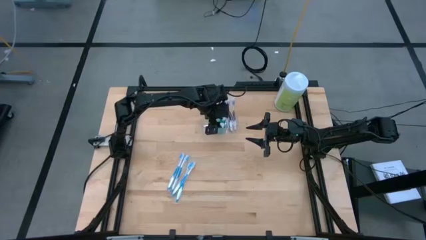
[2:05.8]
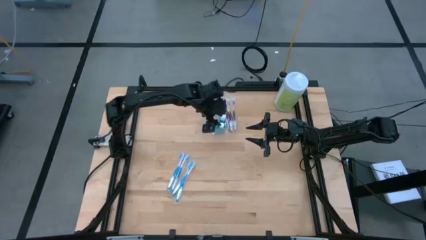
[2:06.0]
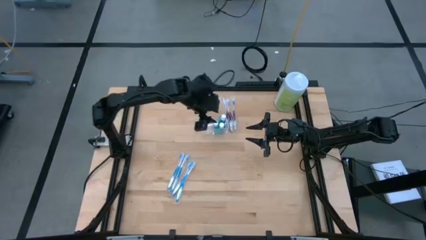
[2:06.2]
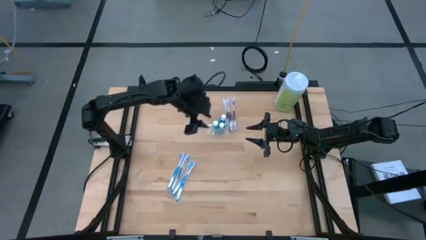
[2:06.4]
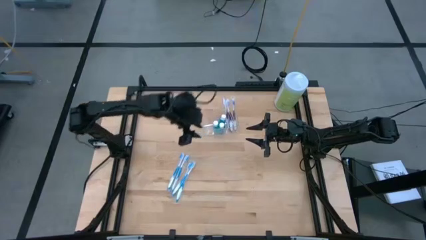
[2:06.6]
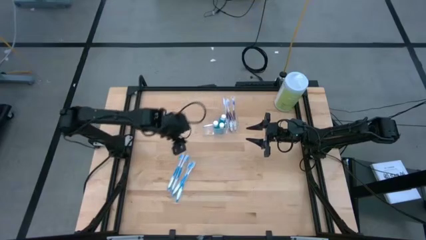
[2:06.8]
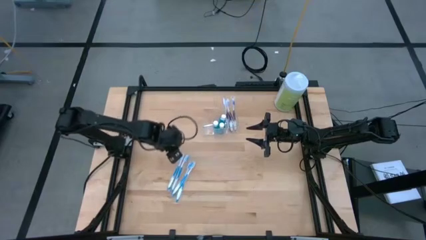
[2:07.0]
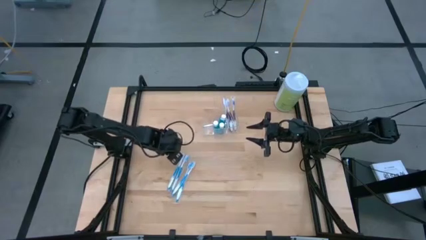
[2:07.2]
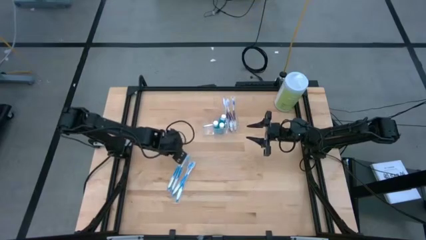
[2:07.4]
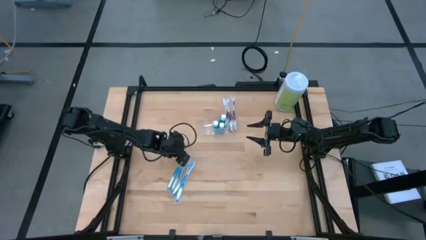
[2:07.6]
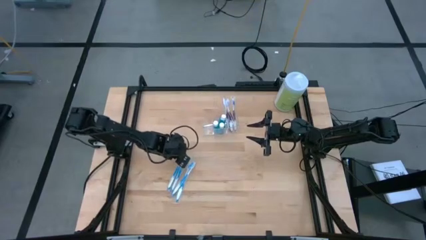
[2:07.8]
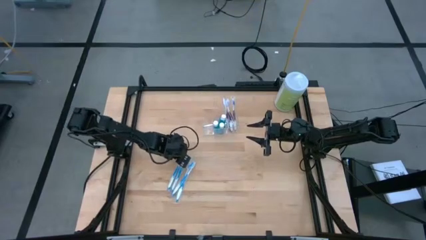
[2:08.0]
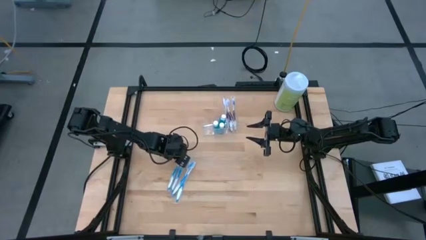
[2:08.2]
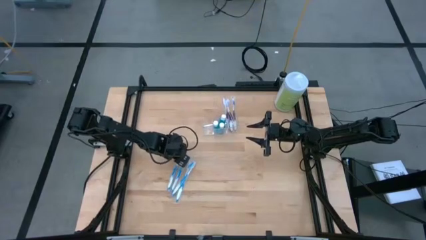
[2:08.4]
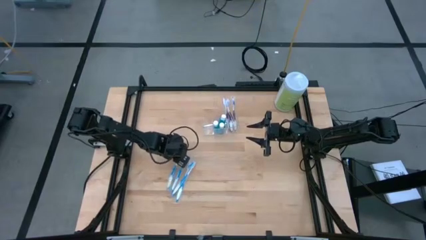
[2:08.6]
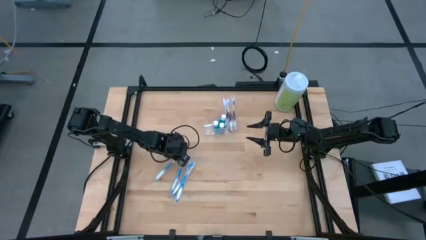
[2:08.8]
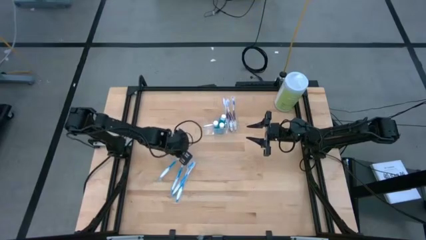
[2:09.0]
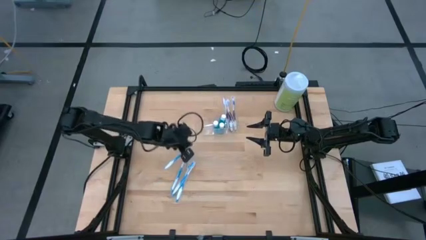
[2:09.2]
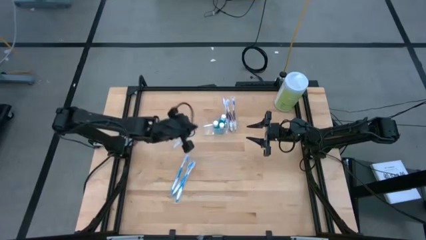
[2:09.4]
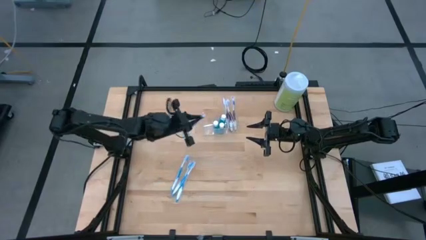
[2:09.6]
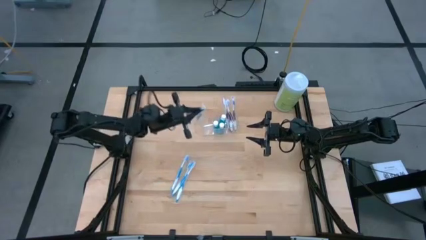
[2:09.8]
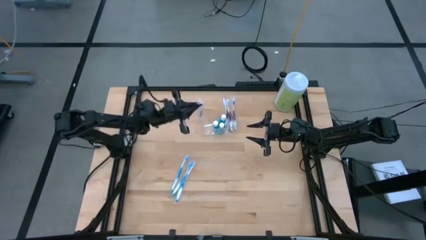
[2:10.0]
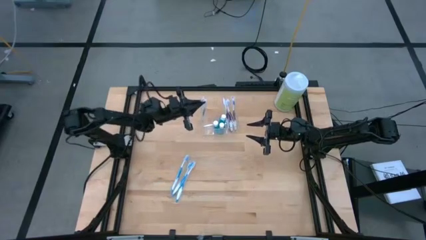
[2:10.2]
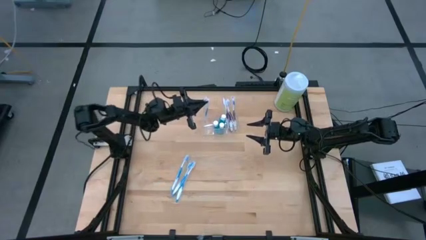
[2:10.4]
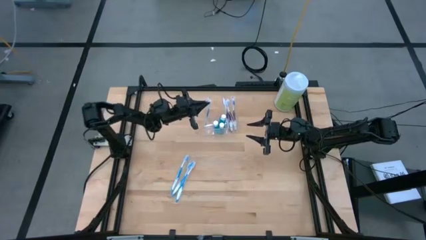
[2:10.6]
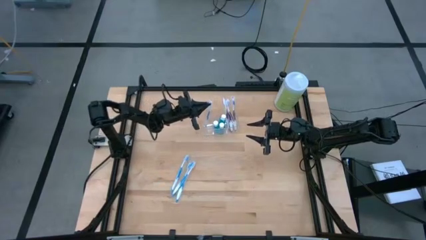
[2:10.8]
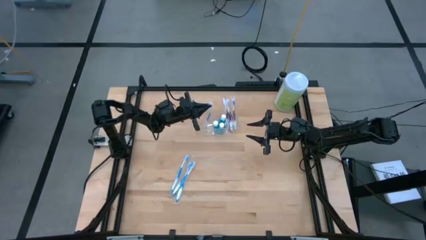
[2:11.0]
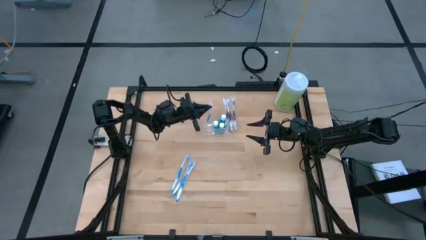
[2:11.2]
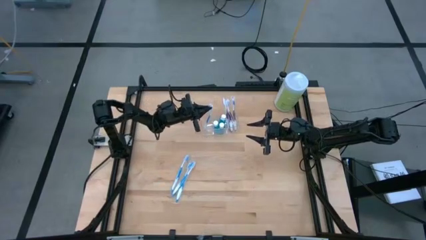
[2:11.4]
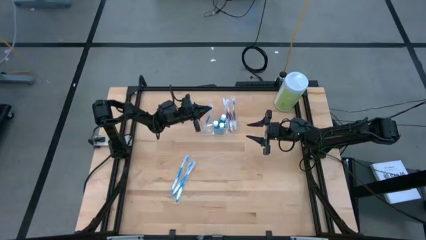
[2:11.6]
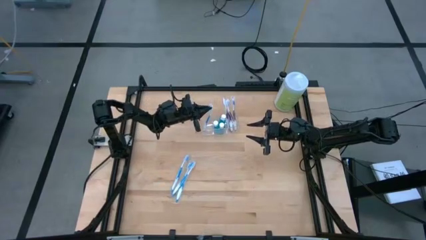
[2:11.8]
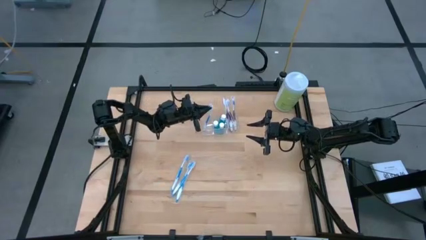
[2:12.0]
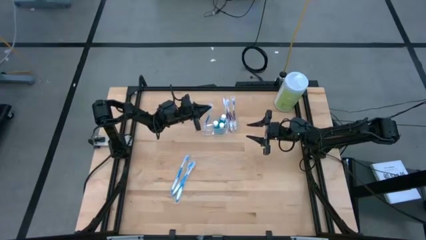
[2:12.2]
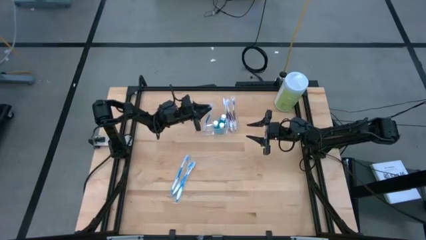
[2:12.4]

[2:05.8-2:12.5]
Task: Pick & Place toothbrushing station
Put the blue toothbrush into the transparent organizer

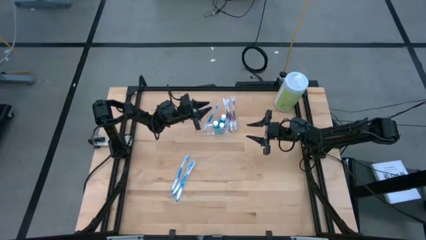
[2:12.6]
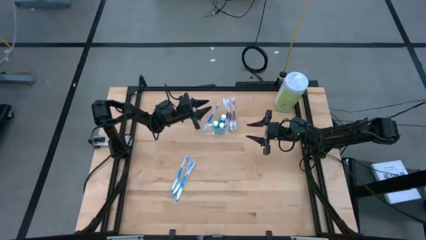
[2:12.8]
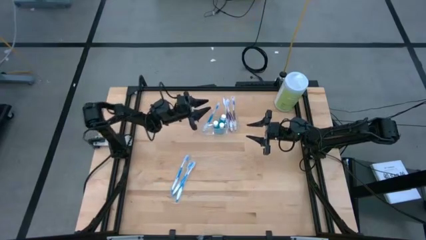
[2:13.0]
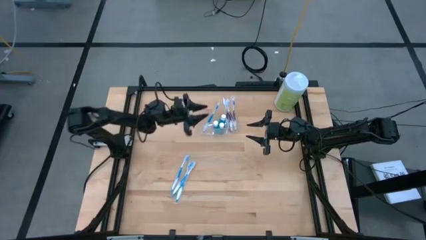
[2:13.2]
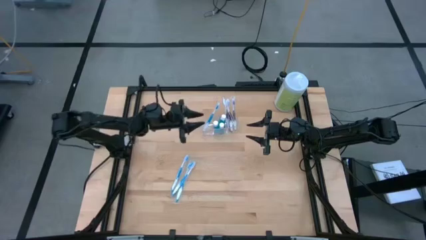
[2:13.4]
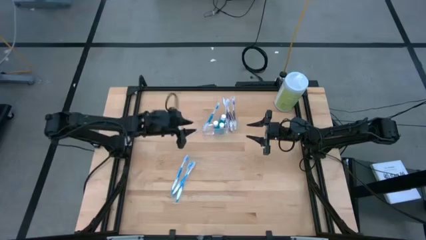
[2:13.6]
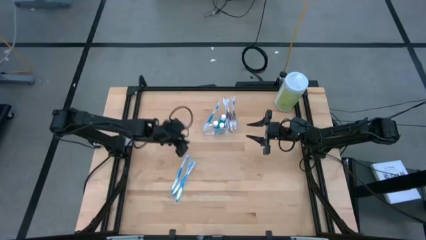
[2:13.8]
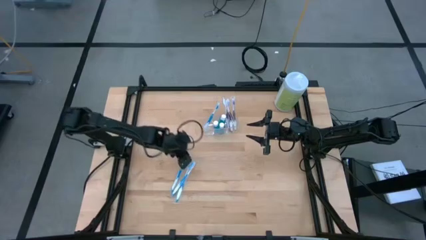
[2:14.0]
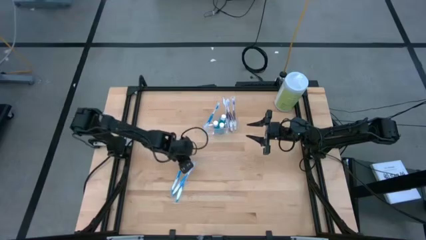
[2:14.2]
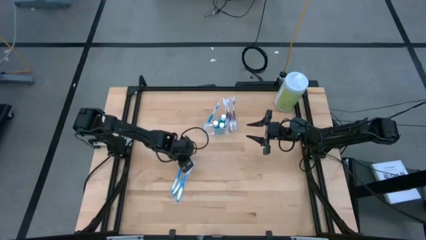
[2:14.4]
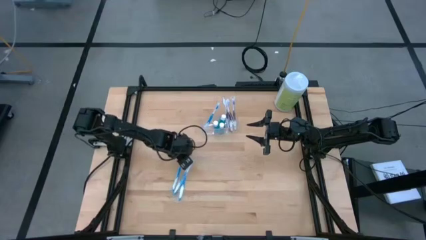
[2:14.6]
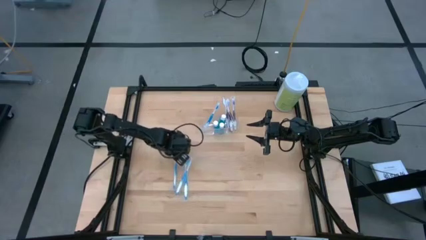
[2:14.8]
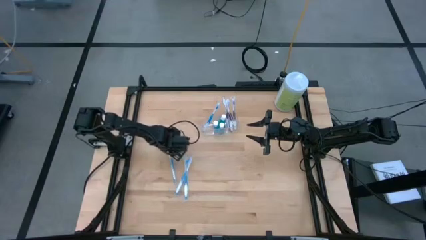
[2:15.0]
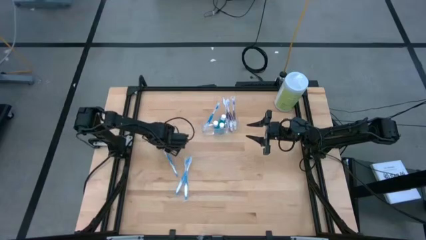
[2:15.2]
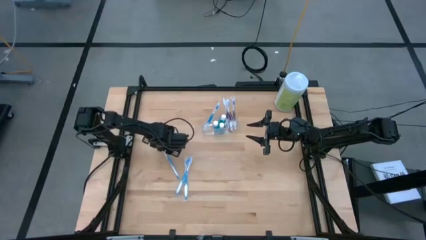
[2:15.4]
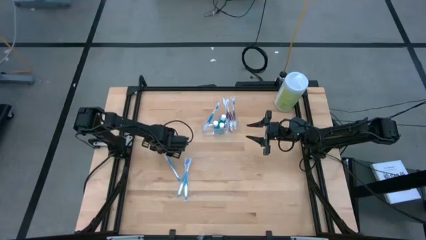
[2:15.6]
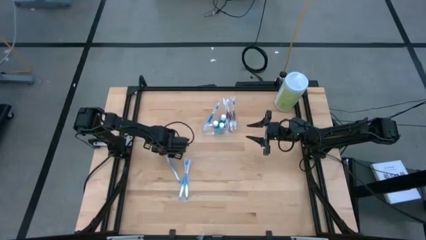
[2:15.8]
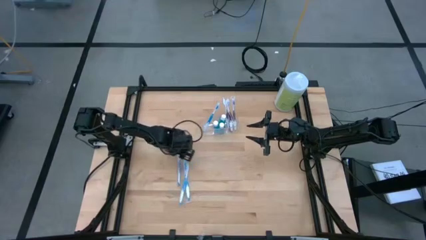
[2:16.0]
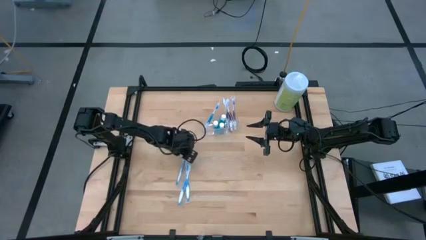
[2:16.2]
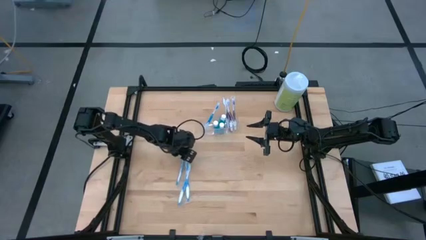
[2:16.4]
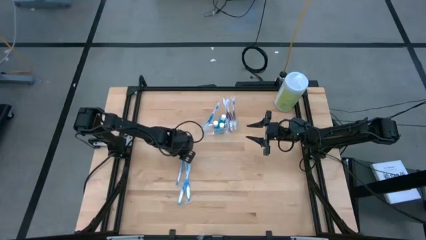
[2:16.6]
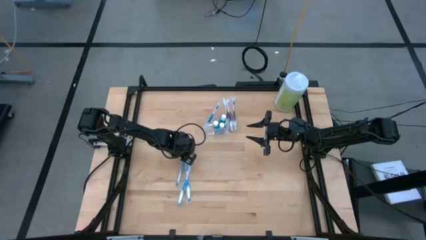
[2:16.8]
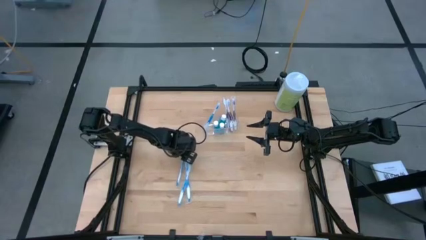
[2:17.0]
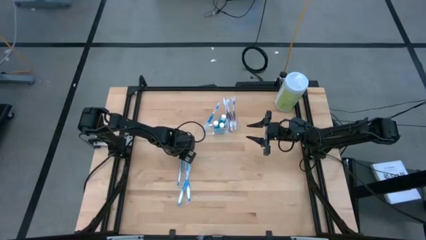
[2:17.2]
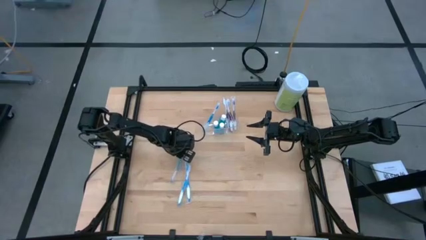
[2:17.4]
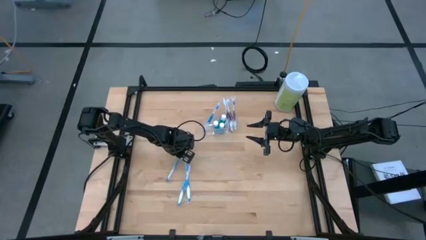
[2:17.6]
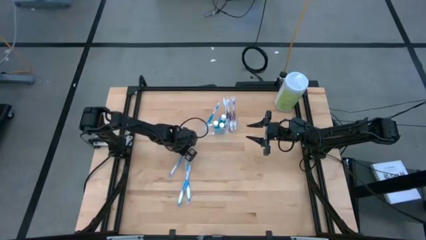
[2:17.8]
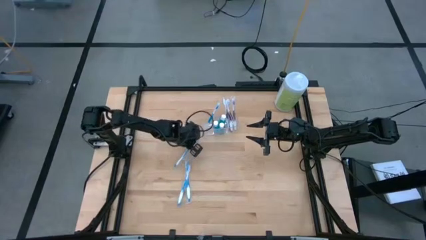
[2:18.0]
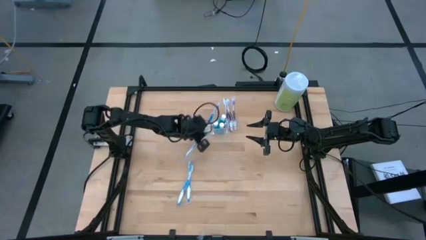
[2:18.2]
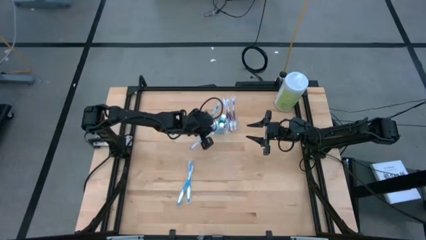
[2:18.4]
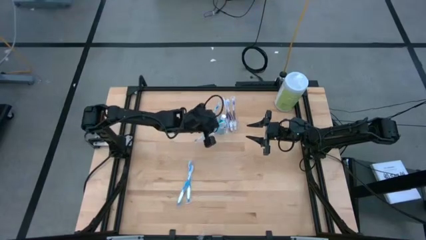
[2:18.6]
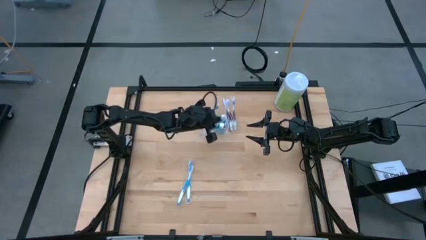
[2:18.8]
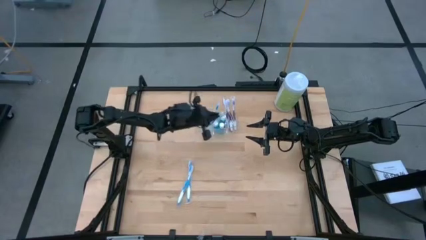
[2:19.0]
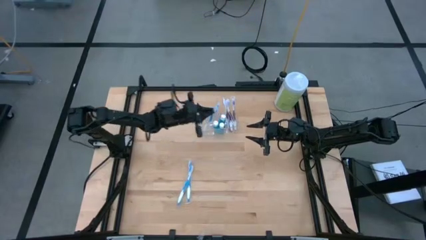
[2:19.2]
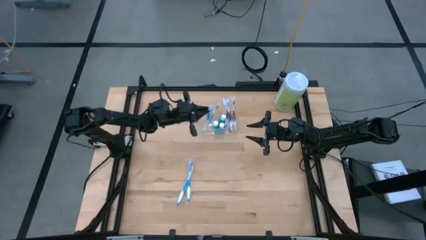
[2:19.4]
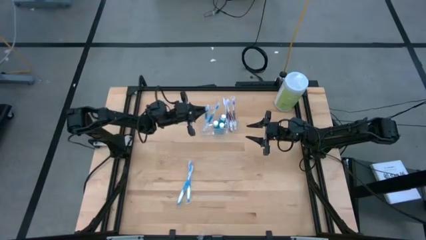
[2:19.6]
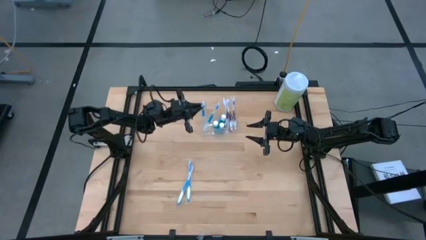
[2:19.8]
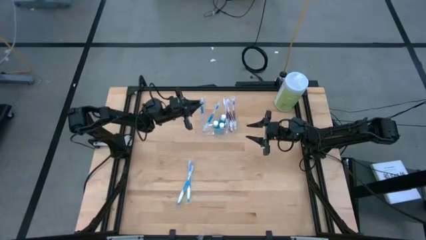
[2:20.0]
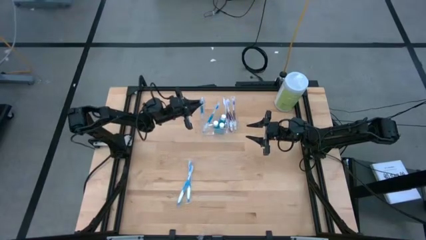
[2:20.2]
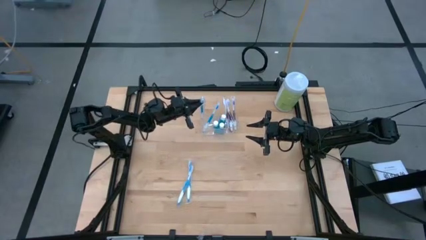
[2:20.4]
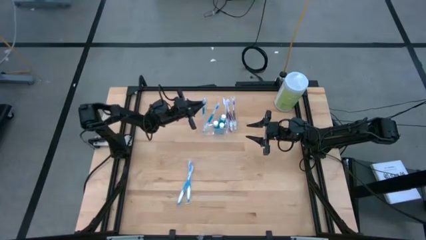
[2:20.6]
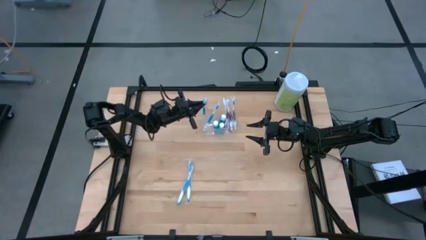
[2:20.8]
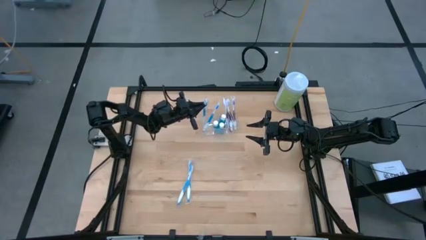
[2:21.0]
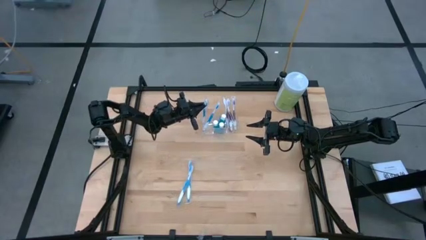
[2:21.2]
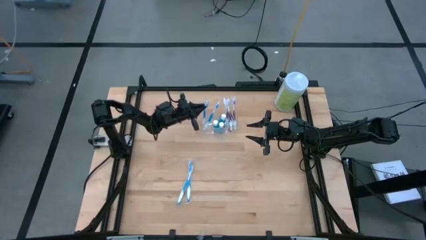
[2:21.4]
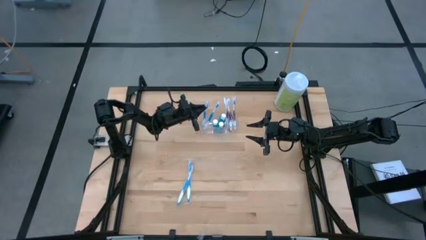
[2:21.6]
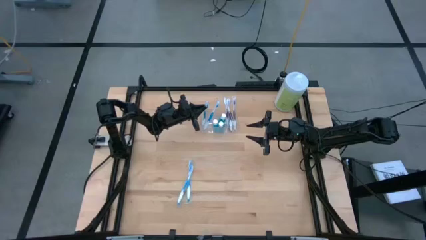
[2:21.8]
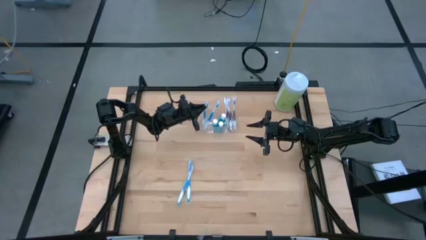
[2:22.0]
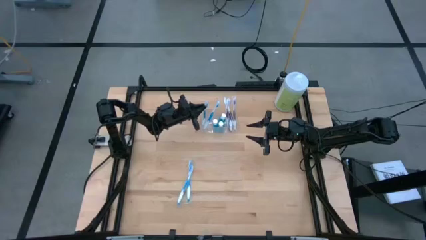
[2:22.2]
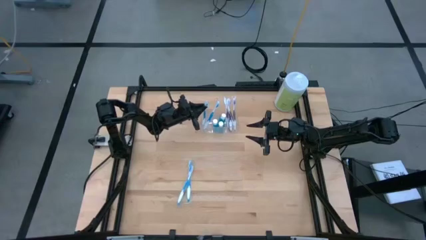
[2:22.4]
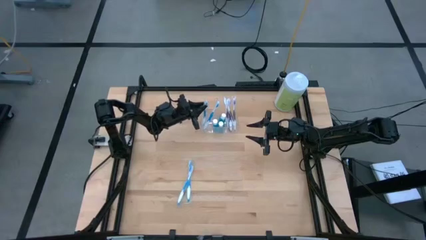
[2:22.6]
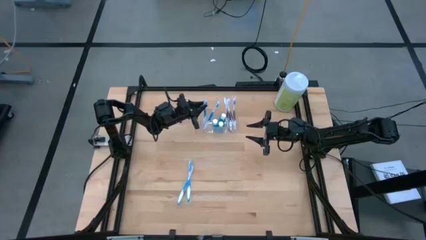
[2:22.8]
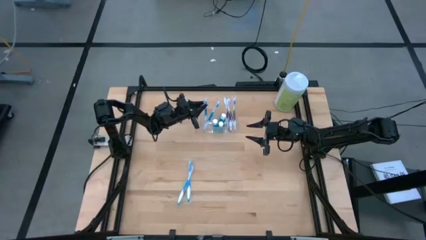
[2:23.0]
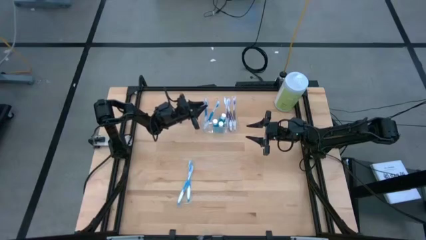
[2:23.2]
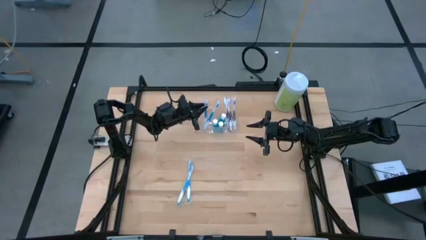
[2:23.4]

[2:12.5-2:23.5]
Put the blue toothbrush into the transparent organizer
